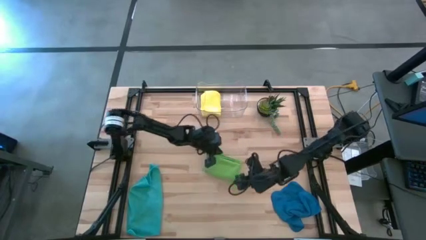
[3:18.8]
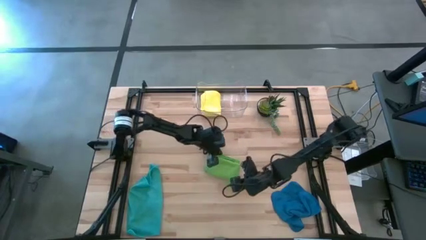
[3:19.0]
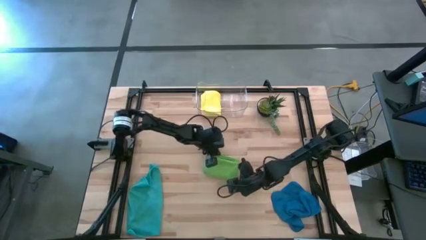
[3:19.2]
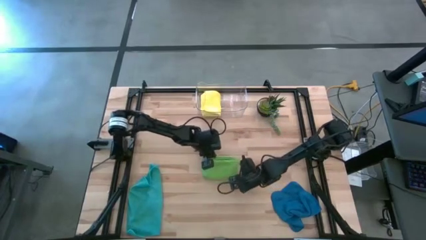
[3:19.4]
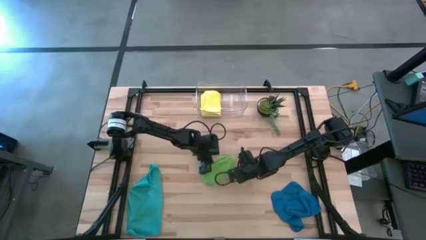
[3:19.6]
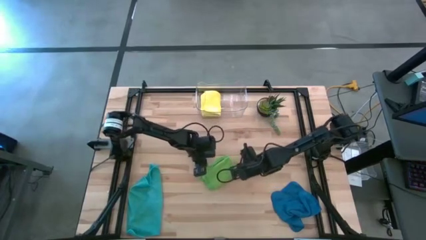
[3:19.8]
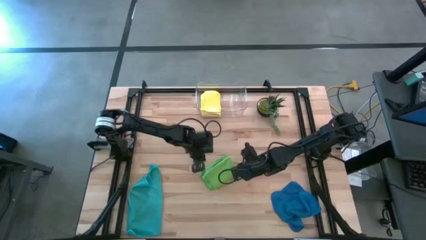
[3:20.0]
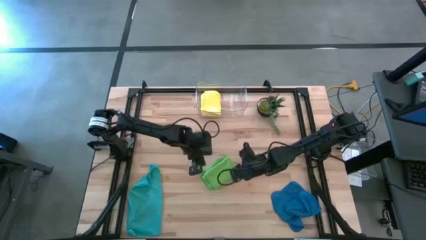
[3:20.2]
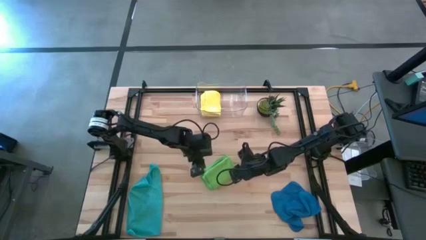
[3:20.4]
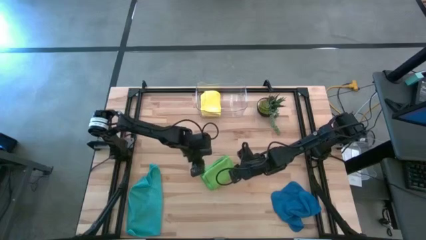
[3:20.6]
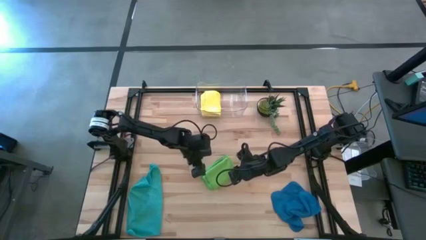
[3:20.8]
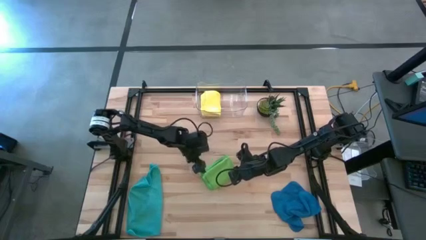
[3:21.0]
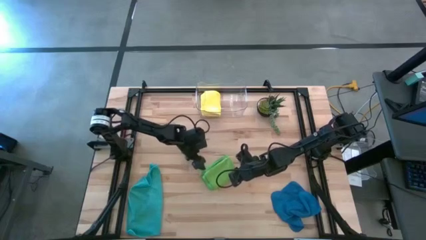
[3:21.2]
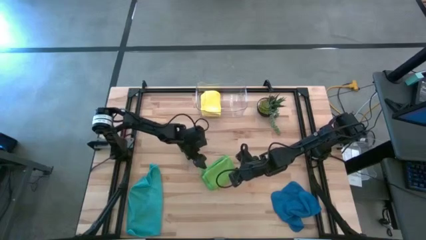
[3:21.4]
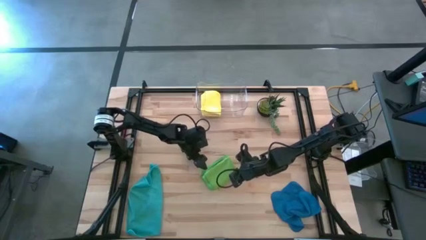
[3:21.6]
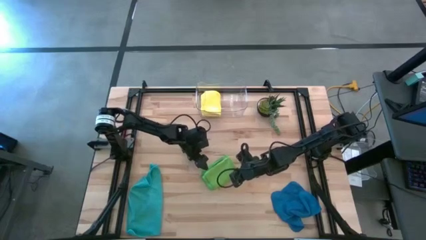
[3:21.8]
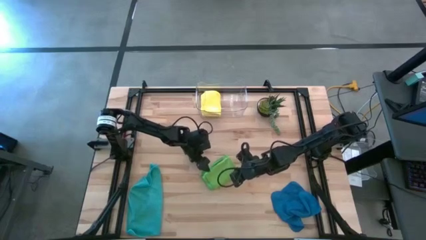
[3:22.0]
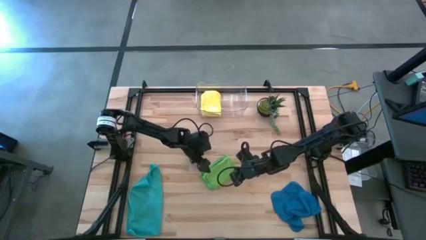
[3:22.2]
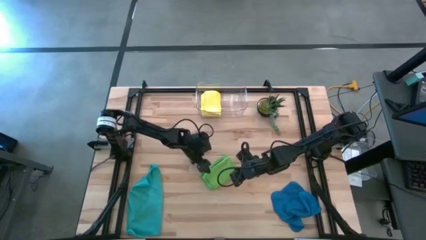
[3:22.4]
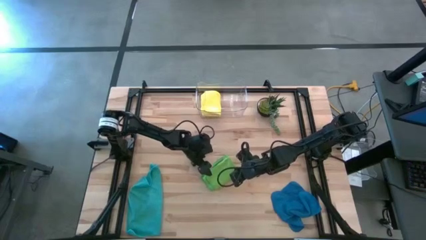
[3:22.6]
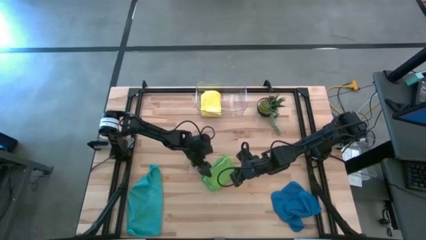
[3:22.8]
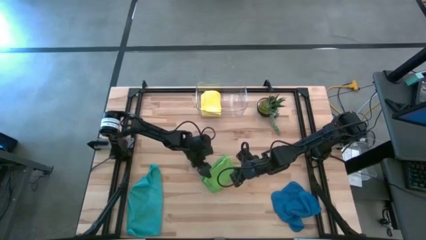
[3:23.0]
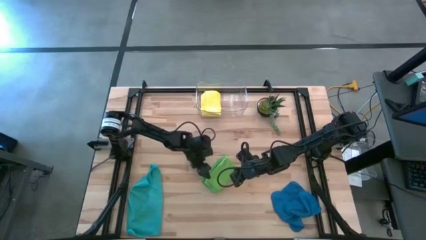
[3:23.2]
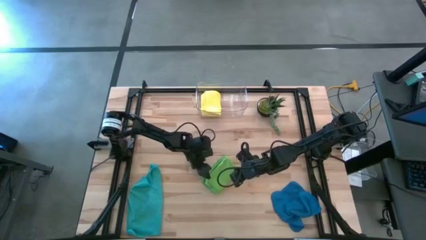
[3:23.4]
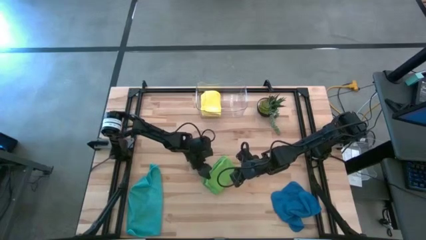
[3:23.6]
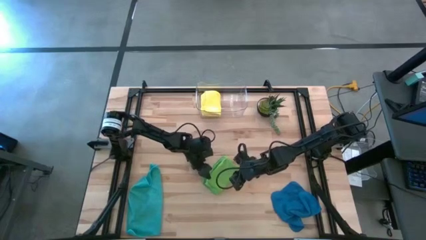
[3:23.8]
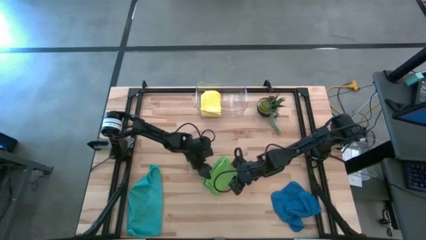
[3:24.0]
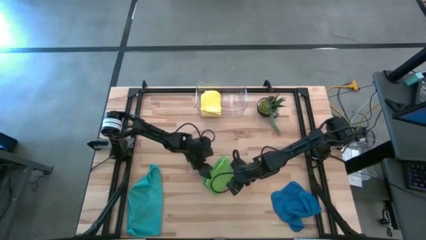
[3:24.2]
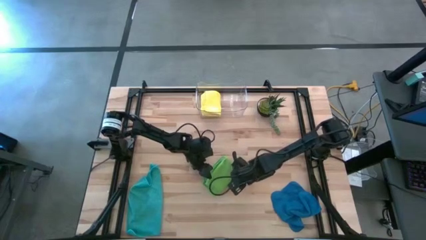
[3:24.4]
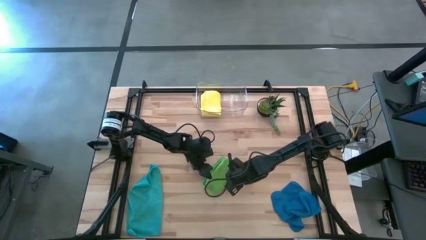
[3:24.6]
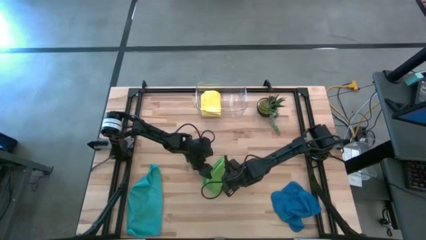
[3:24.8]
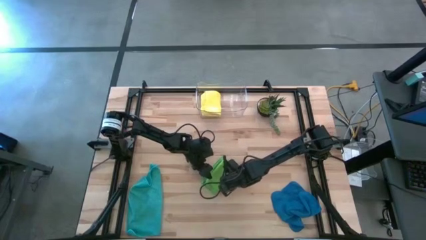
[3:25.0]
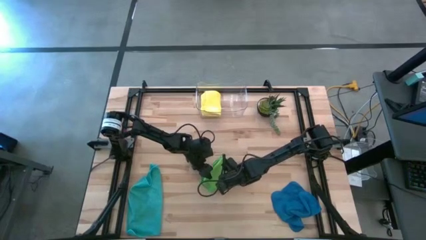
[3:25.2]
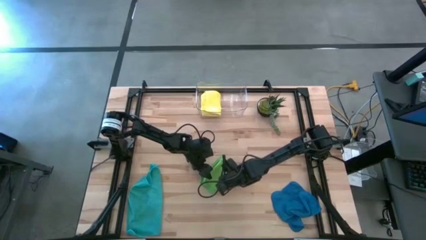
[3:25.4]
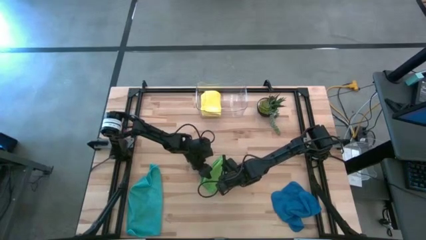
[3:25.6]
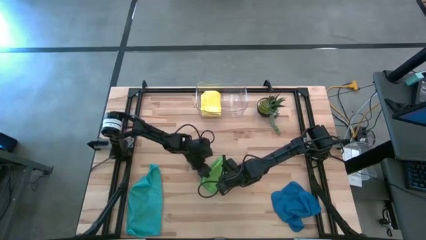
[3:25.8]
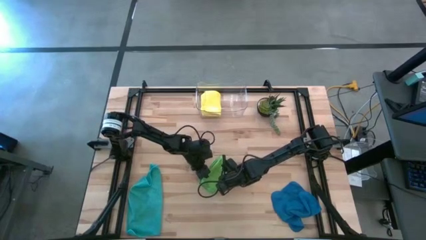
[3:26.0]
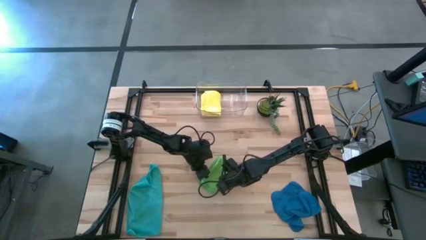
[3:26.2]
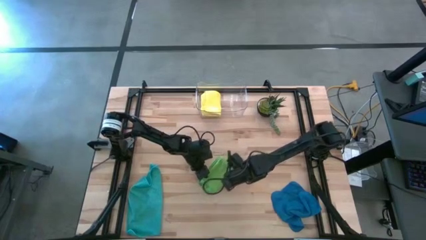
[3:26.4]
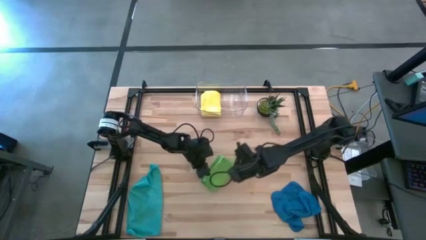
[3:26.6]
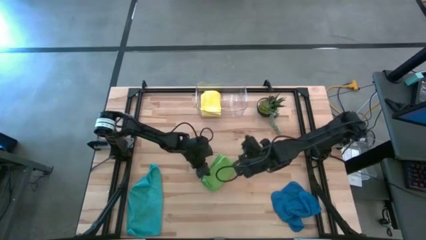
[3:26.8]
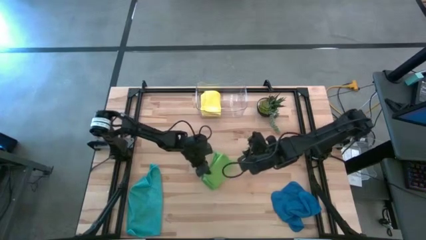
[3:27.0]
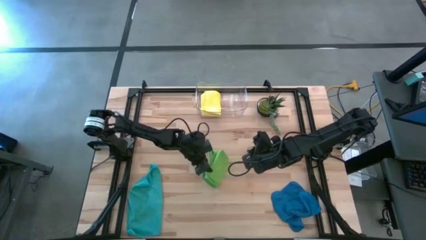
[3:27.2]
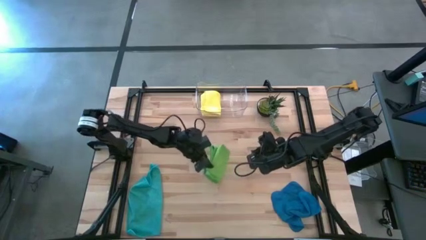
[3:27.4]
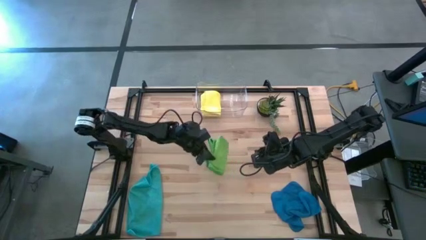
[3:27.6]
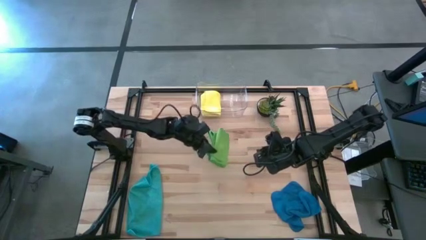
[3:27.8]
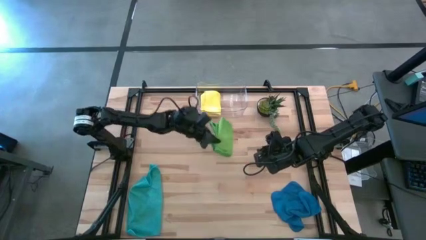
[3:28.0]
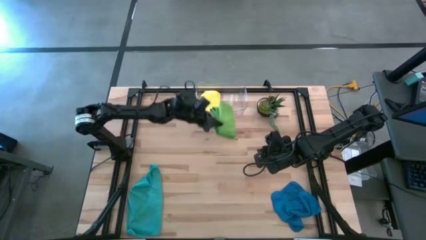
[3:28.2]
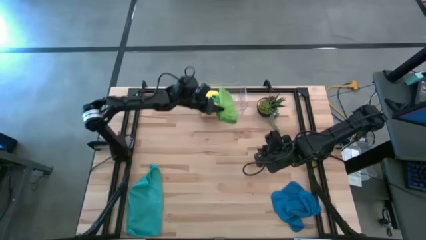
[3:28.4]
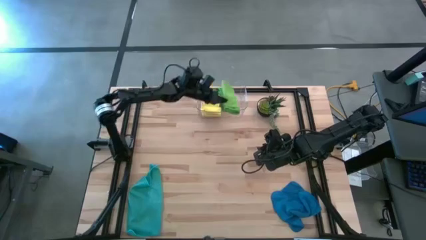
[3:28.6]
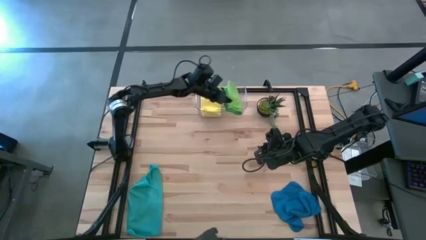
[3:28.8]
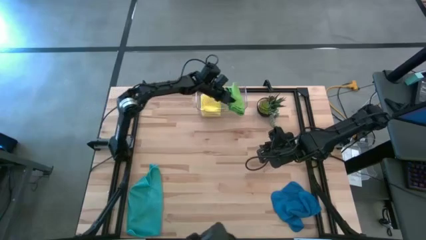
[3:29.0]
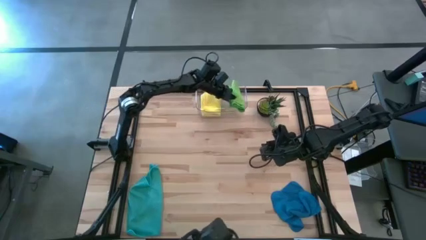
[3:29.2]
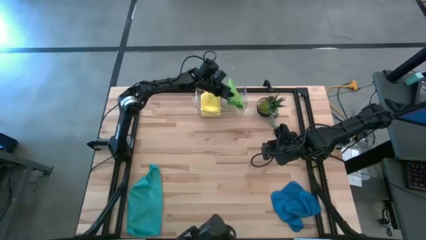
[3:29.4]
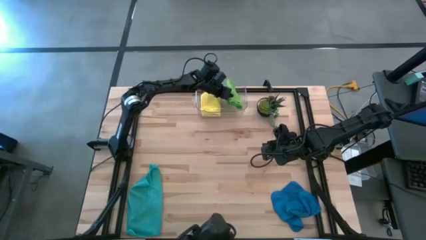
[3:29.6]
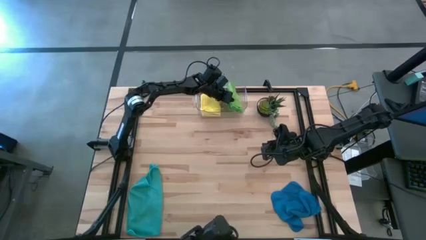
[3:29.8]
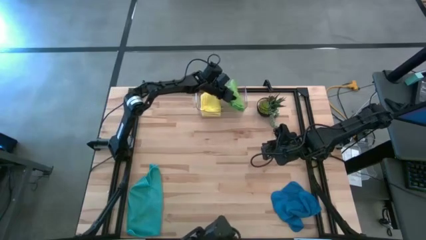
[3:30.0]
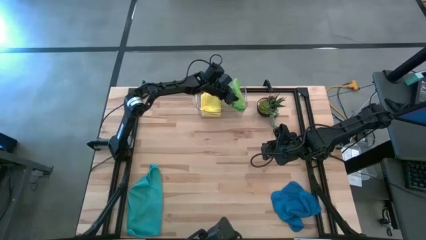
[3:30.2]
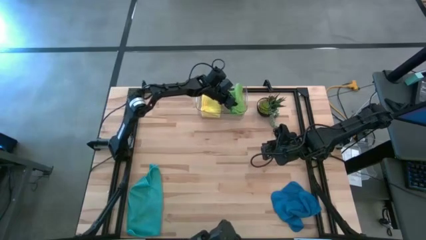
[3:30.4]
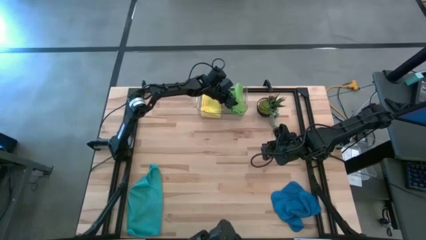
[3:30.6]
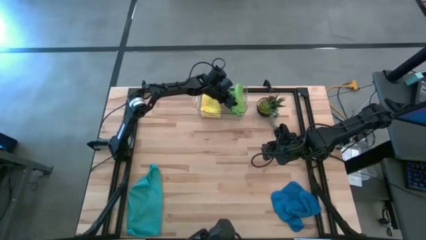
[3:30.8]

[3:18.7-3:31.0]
Task: Fold microfiber towels
Put the green microfiber towel into the transparent bin

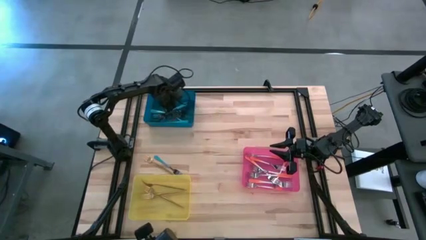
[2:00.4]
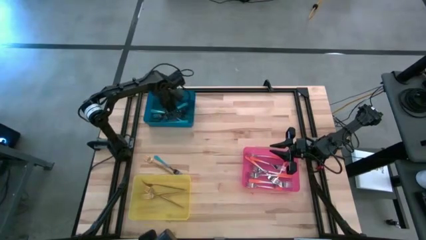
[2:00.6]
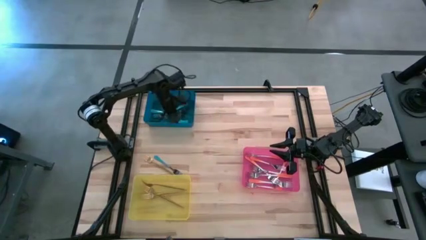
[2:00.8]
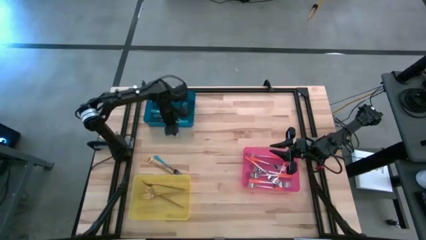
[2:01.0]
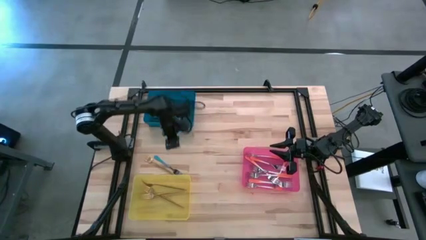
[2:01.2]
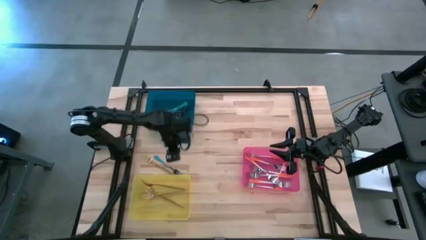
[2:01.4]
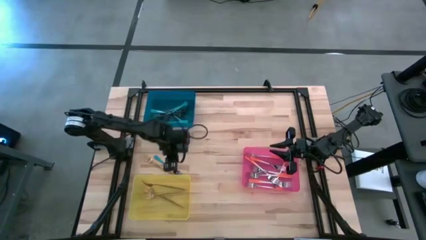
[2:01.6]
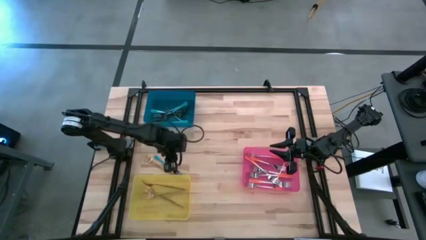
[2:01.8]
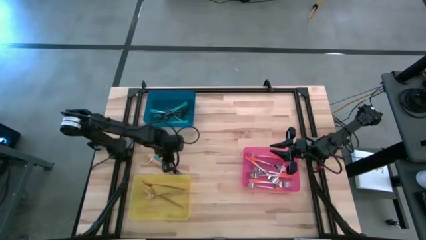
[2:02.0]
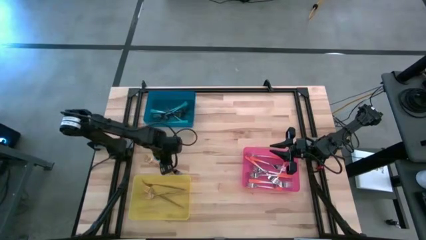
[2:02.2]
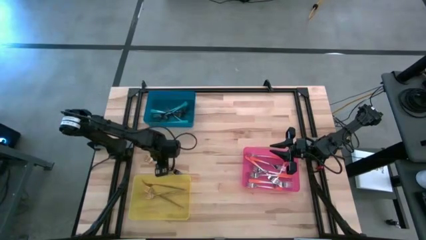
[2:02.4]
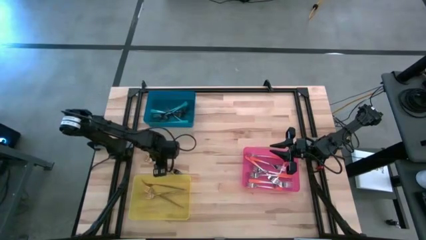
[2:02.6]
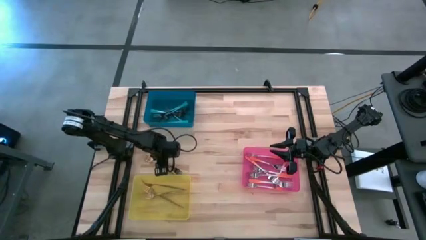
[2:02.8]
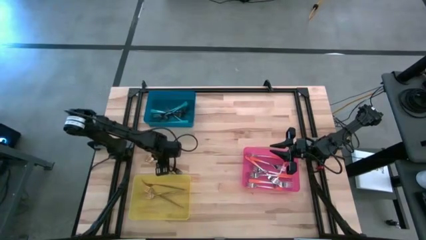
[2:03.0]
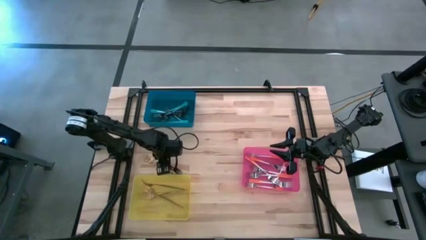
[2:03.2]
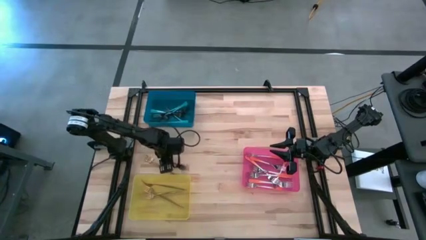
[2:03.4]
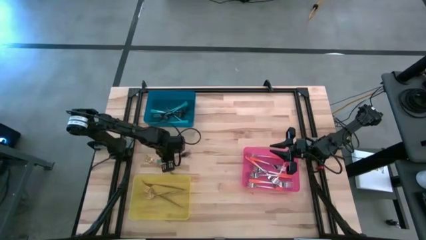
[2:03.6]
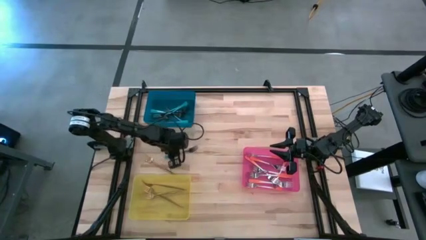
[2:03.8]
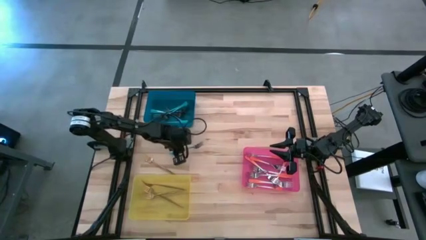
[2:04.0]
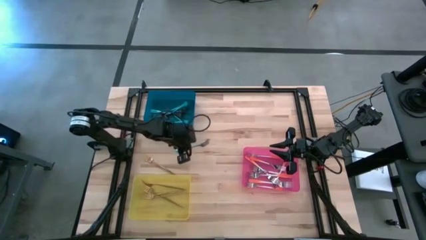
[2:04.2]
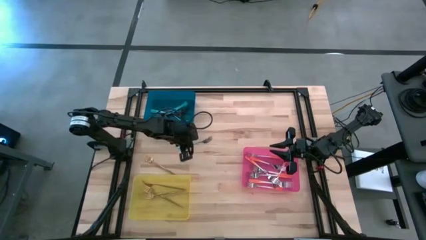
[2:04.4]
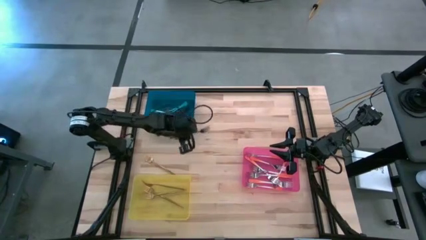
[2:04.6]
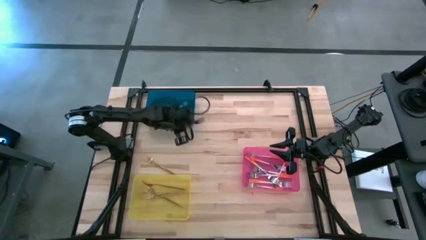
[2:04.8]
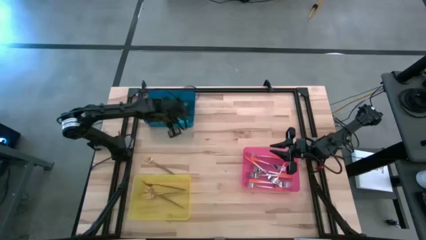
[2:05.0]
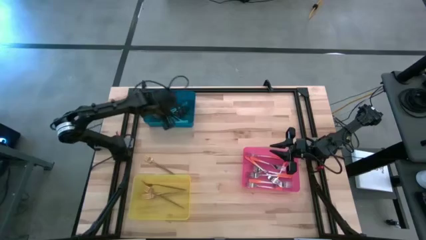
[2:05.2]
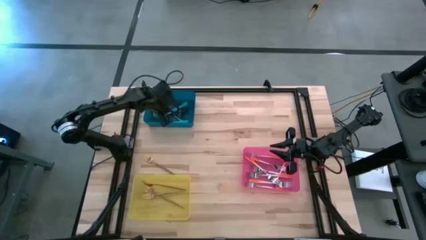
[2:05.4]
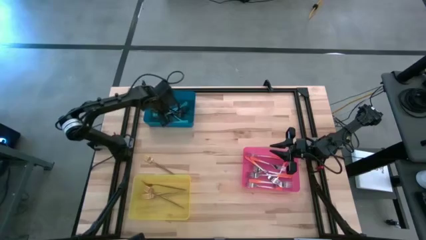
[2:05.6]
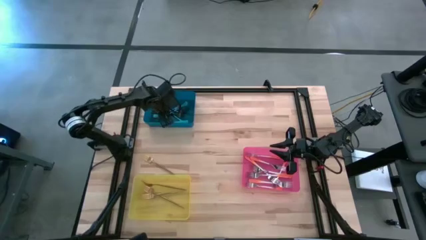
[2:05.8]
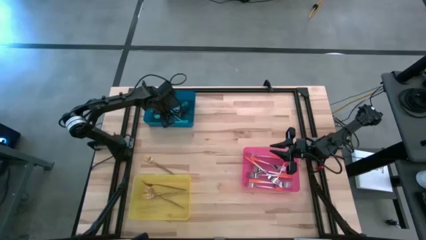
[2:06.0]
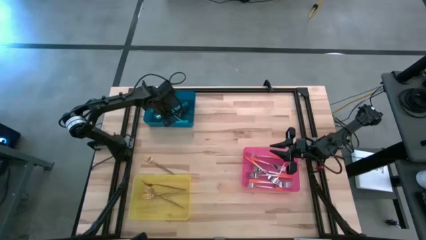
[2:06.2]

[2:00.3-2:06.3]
Task: Sort silverware by color (type)
Put the blue fork into the blue bin
